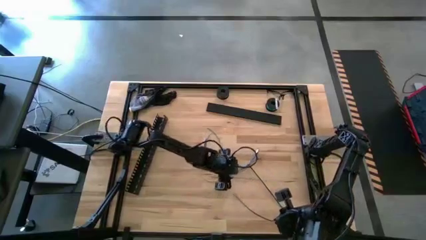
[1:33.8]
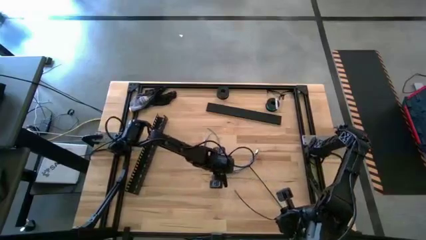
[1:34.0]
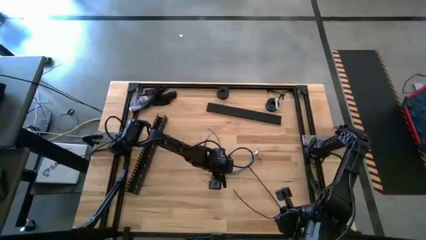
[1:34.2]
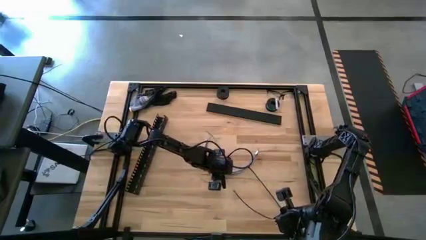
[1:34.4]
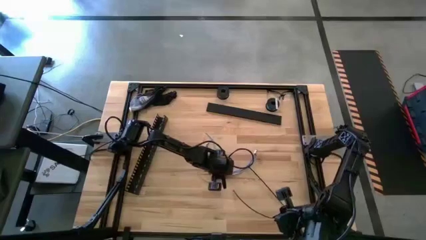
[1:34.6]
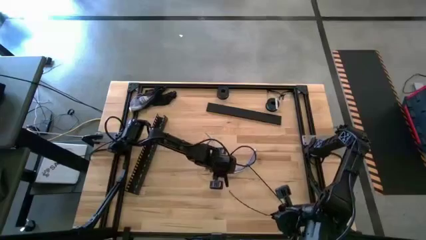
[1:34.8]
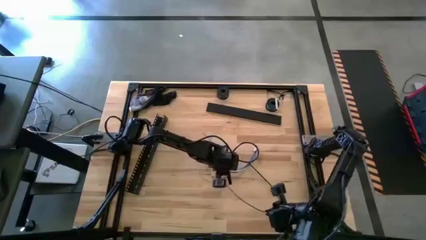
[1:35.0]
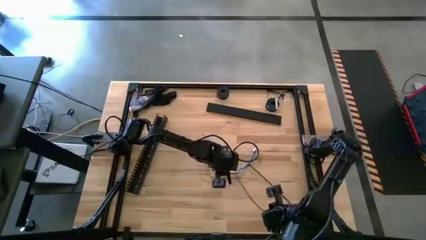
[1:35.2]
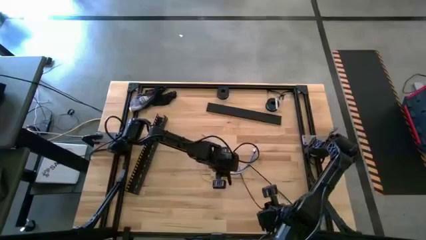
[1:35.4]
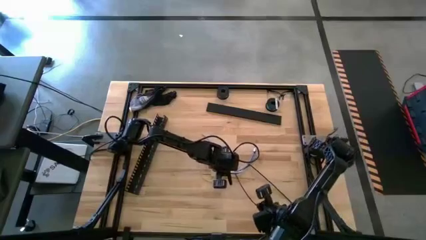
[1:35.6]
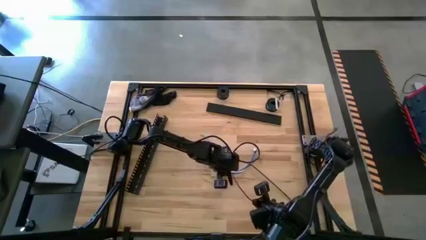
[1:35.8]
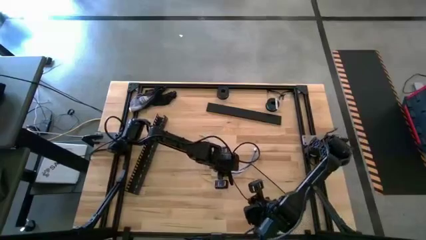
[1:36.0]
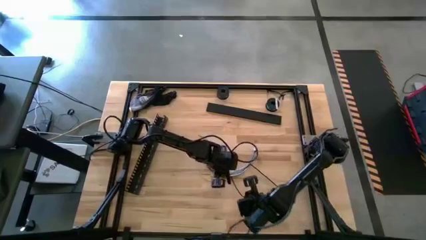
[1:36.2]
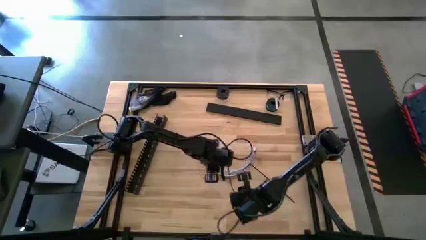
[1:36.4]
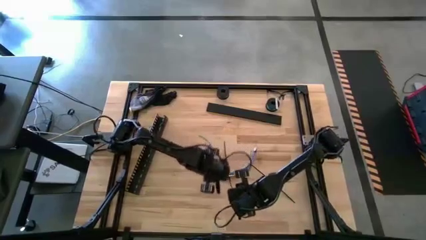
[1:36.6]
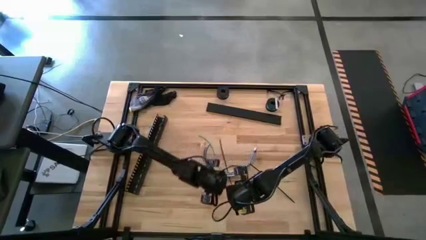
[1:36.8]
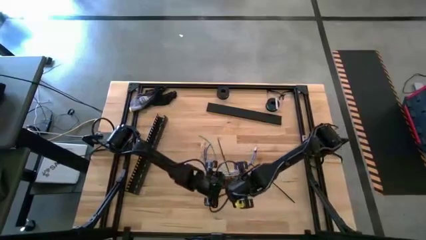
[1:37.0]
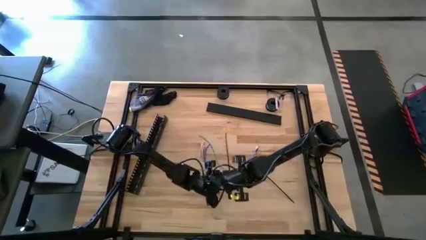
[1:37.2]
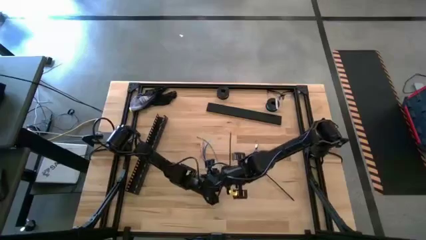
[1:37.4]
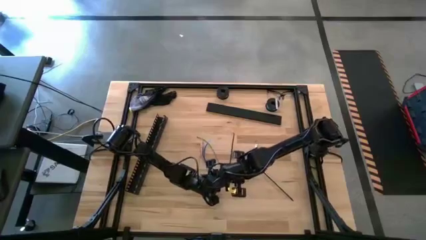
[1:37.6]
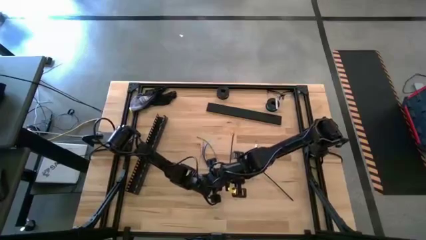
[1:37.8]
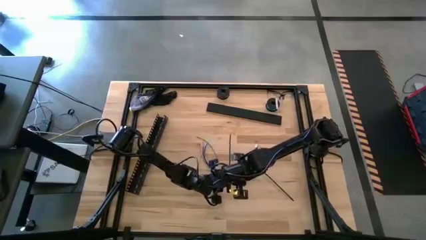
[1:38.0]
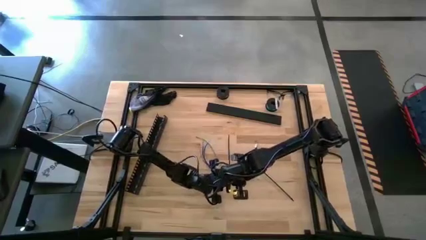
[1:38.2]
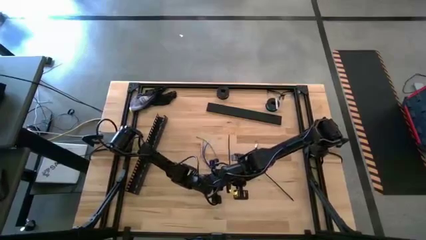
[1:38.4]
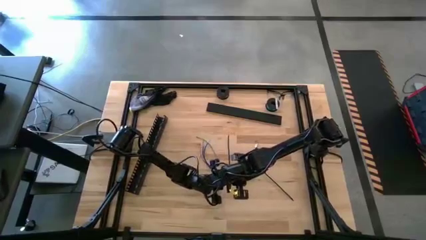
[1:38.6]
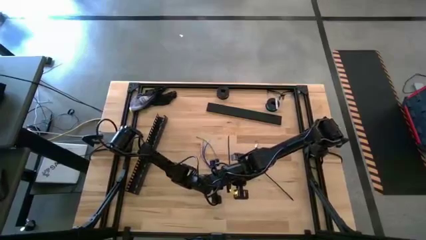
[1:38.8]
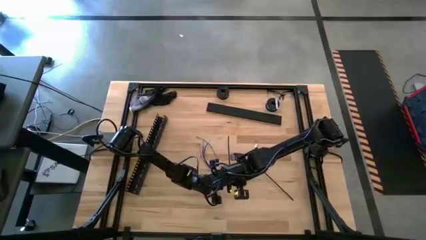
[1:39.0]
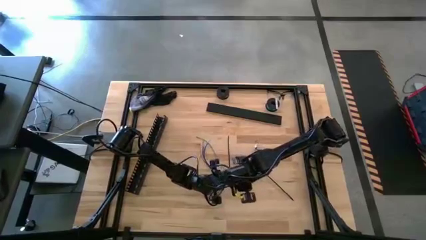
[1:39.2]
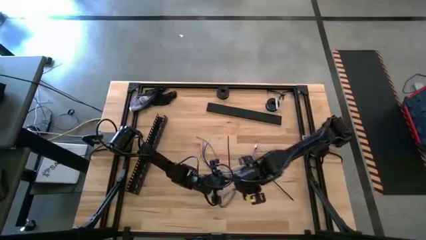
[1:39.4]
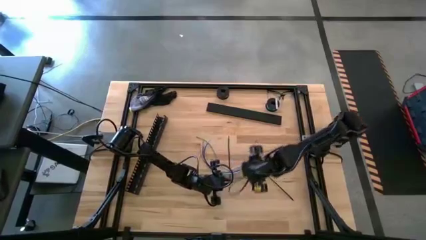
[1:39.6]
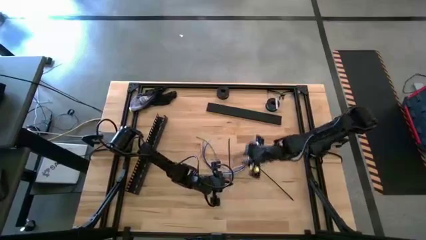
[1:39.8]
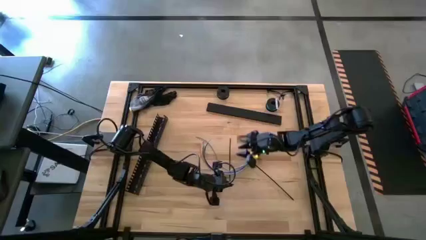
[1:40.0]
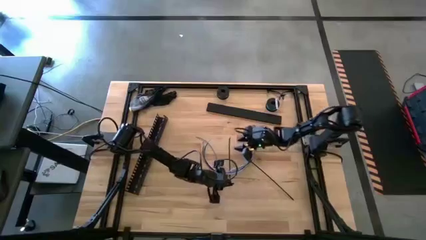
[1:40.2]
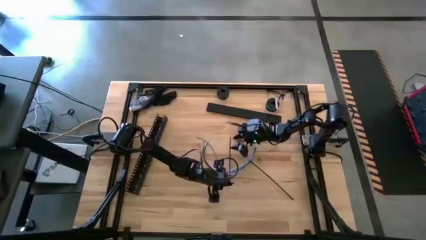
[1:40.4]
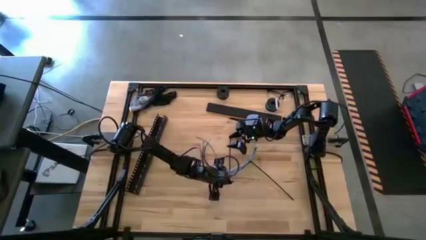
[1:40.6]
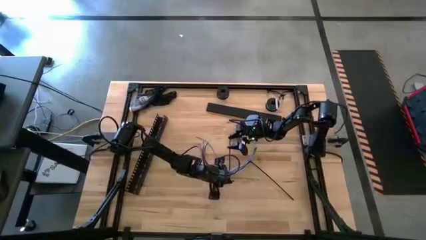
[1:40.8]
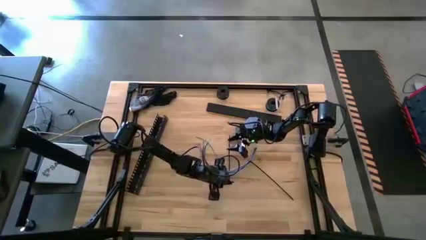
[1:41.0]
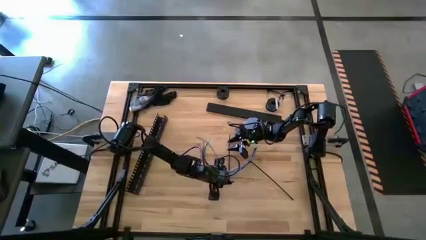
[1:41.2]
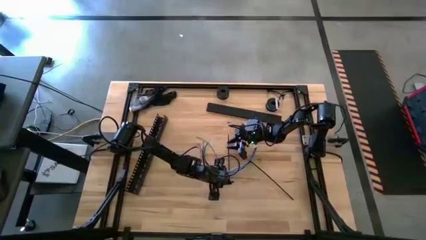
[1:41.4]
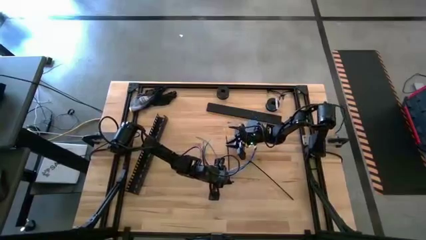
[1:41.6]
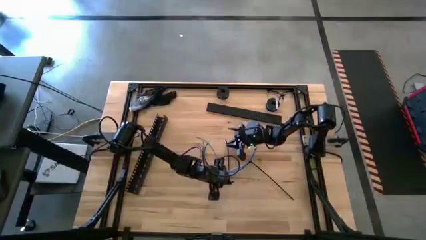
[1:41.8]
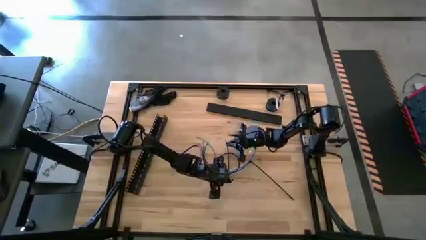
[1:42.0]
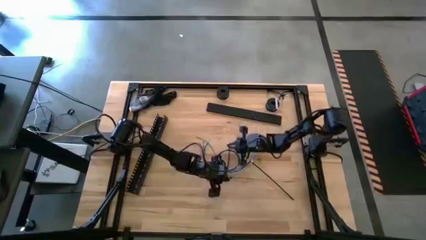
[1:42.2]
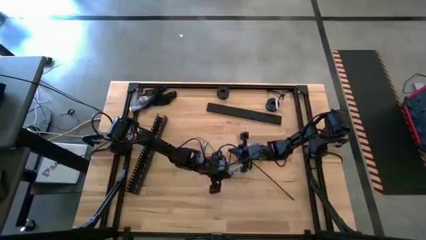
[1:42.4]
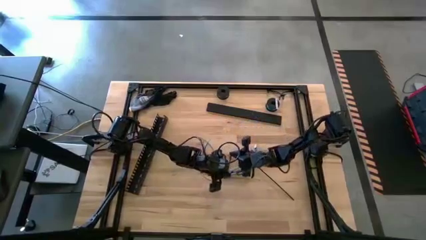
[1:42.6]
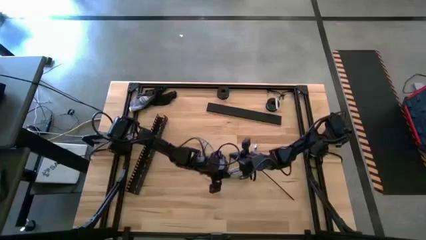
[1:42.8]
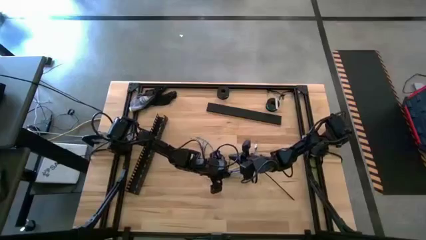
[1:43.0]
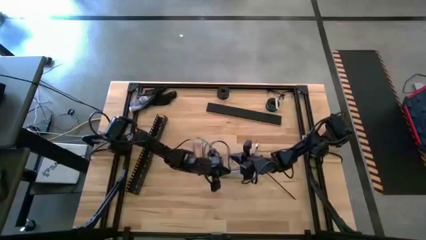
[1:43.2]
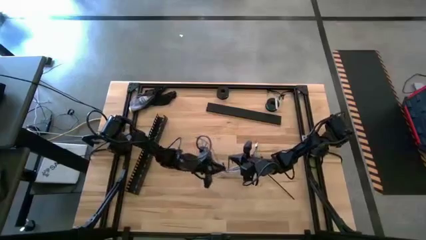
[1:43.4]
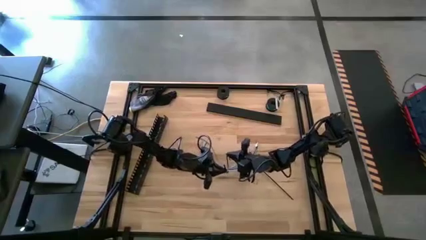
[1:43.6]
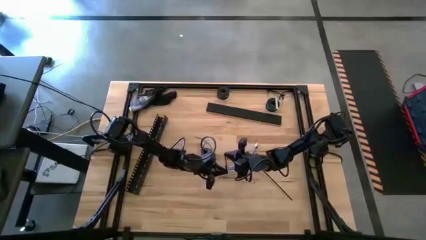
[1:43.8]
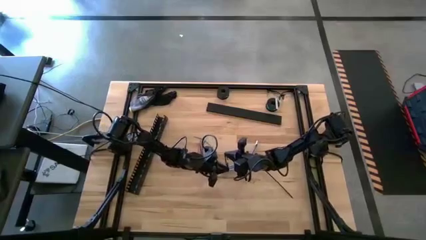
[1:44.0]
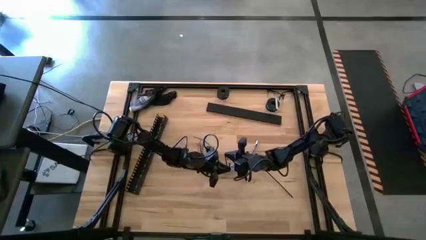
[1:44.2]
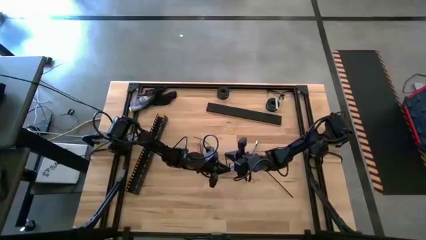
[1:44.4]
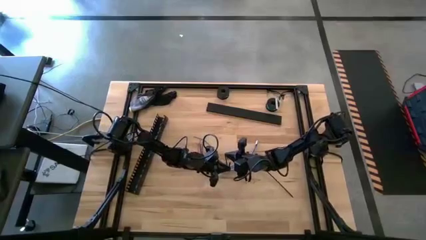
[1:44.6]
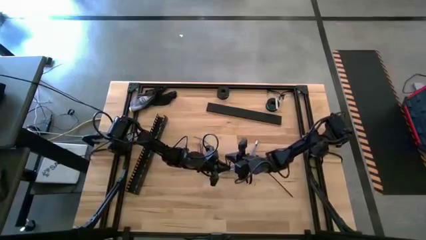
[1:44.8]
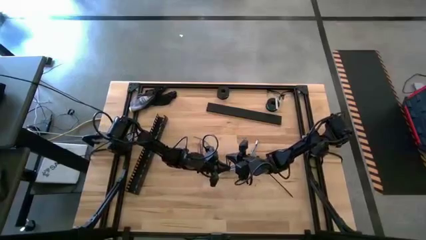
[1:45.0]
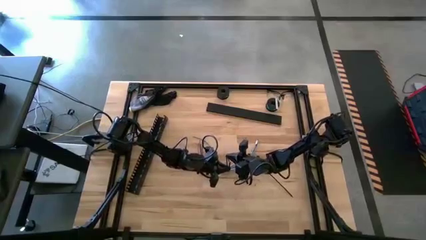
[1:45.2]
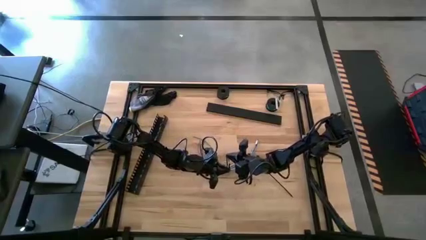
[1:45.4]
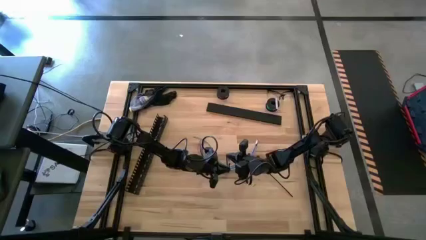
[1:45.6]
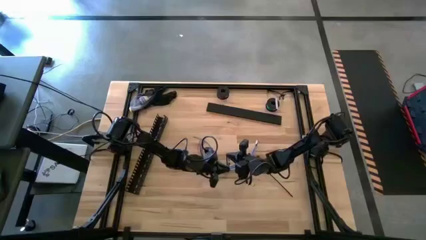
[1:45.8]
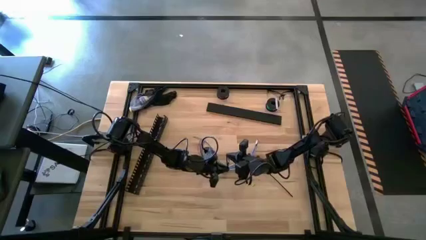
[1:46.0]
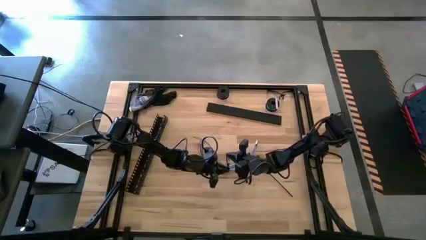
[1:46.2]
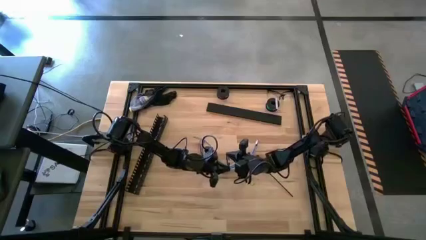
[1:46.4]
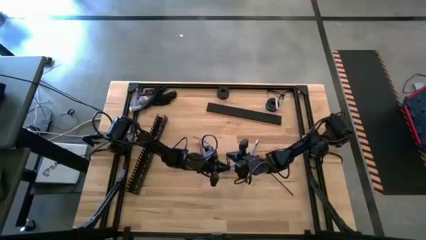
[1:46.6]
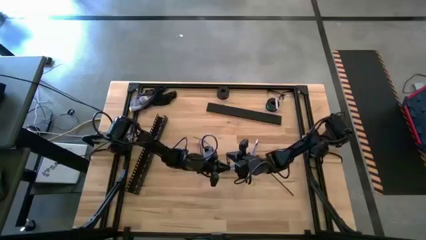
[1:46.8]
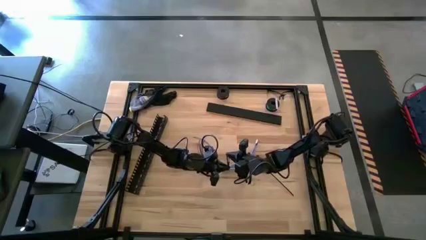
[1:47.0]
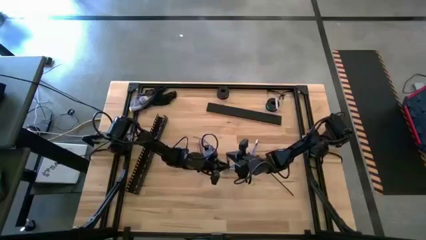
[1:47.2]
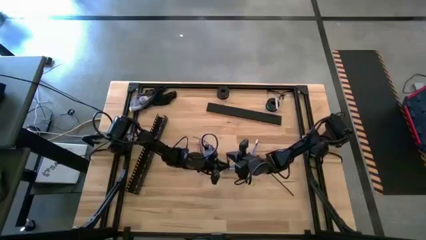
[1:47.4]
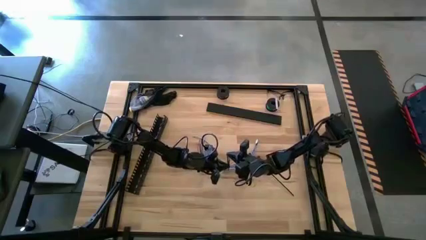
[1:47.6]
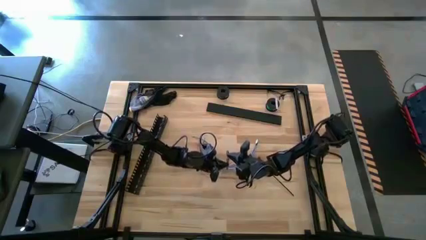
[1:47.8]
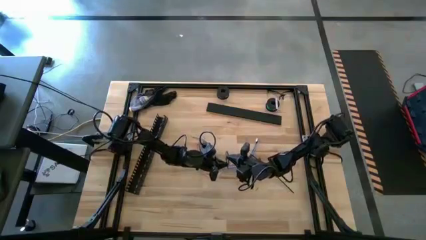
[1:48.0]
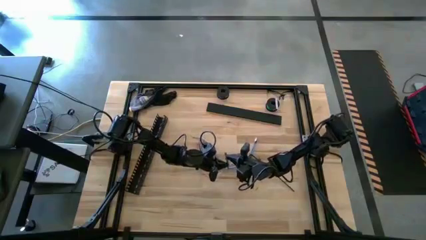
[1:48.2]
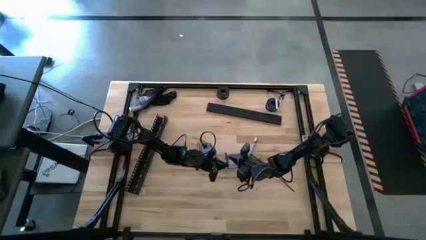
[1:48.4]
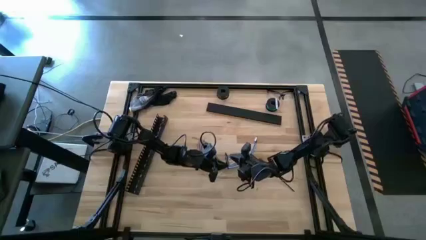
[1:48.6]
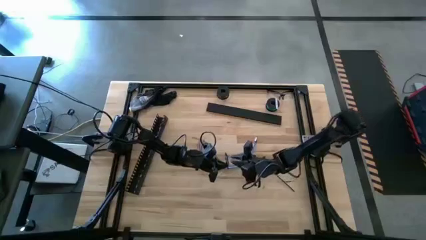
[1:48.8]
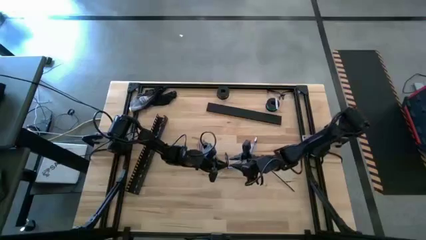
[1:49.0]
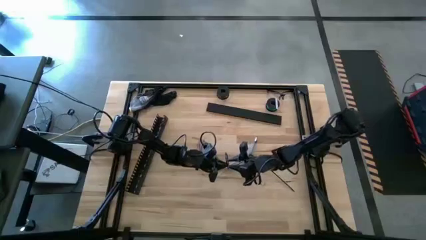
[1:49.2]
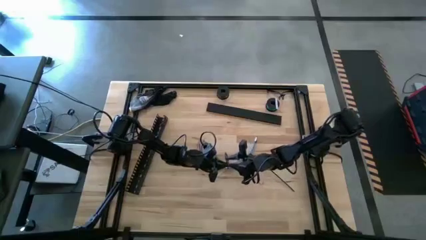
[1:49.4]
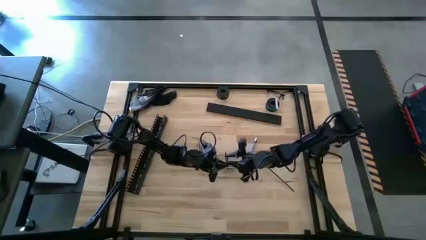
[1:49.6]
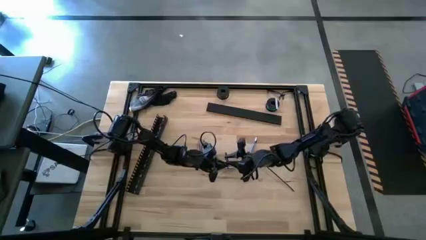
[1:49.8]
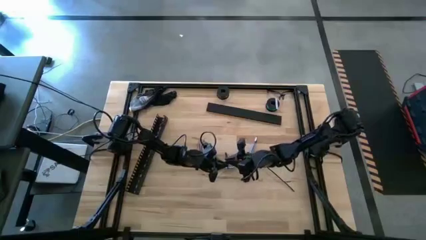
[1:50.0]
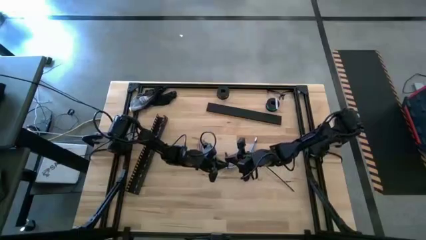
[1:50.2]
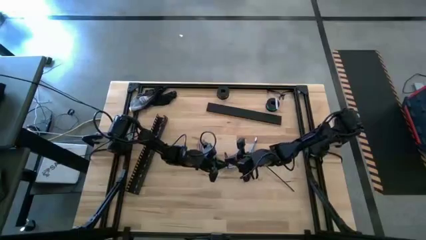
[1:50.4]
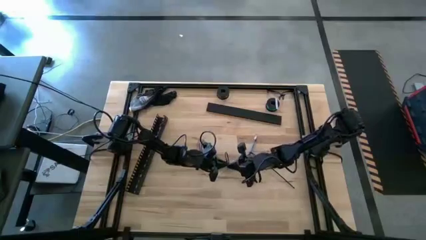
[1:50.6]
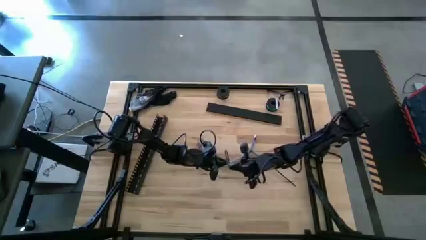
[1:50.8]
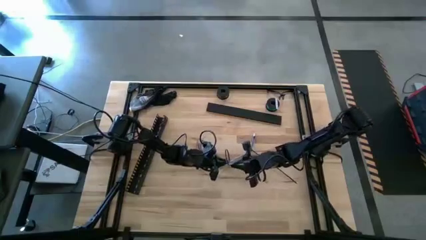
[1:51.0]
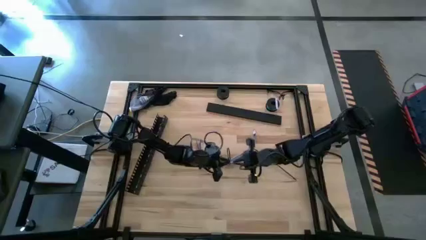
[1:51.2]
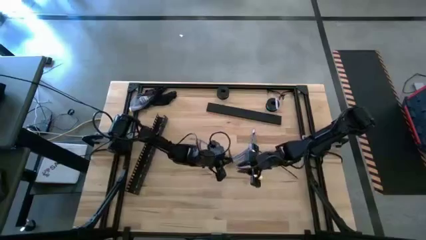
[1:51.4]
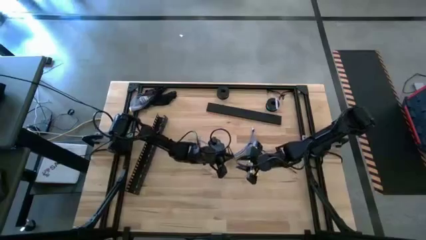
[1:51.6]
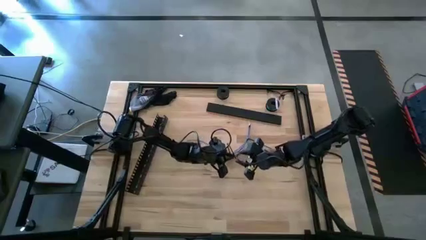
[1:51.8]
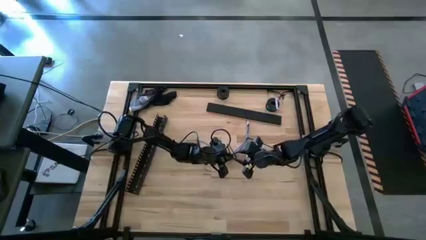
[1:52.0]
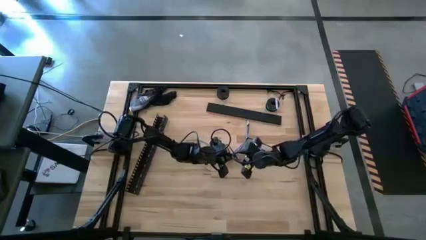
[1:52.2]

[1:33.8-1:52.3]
Task: Ziptie cables
Insert the cable zip tie into the cable wires
